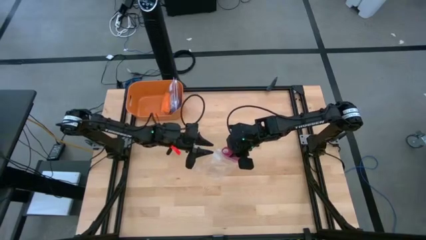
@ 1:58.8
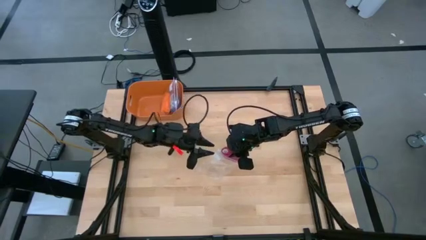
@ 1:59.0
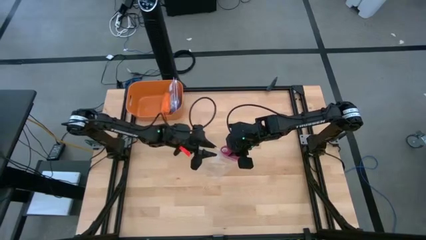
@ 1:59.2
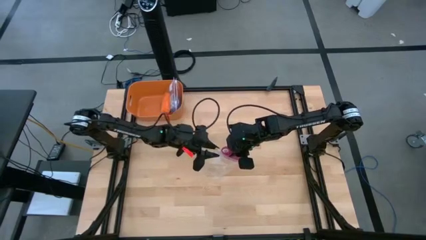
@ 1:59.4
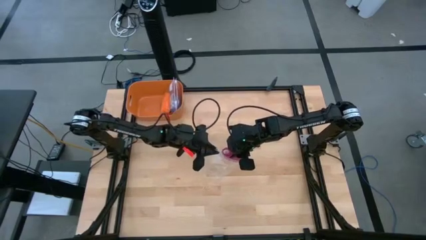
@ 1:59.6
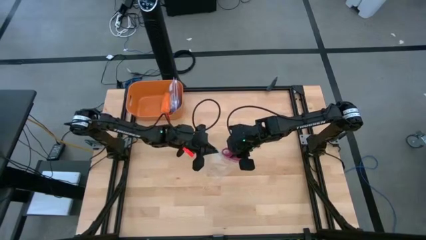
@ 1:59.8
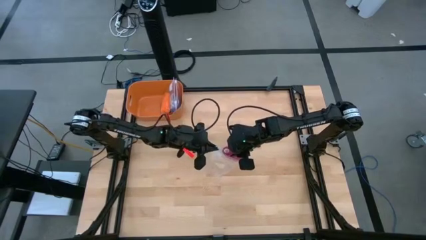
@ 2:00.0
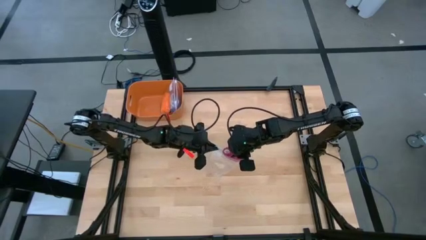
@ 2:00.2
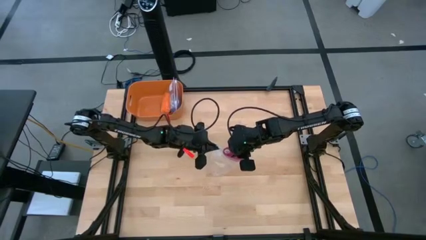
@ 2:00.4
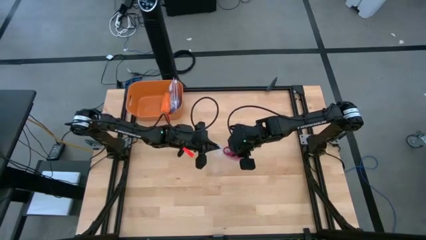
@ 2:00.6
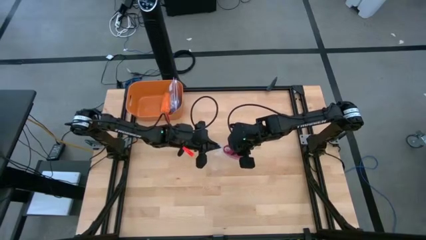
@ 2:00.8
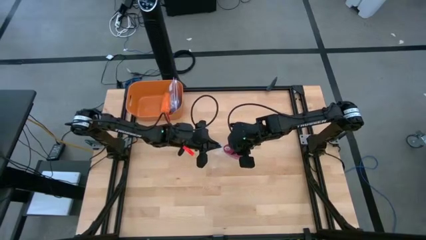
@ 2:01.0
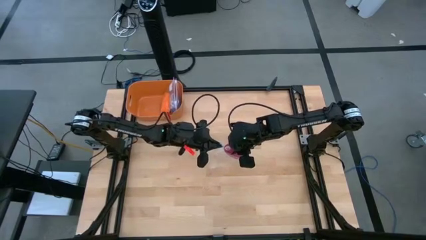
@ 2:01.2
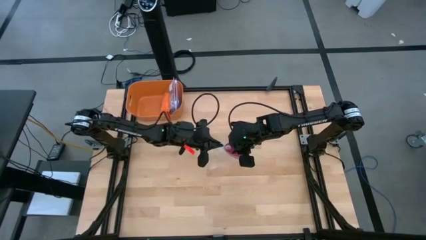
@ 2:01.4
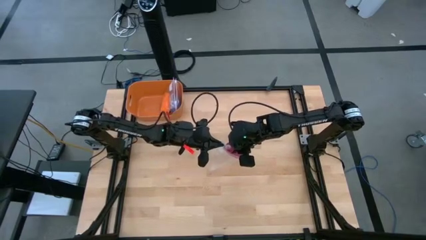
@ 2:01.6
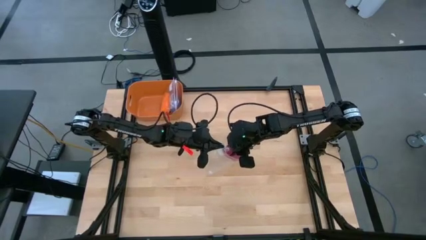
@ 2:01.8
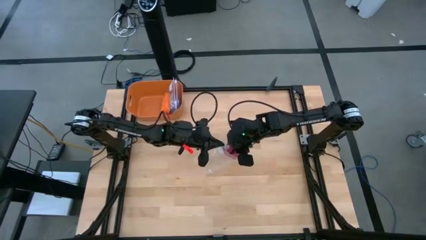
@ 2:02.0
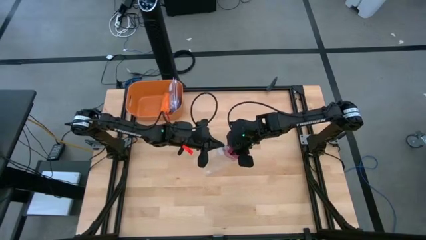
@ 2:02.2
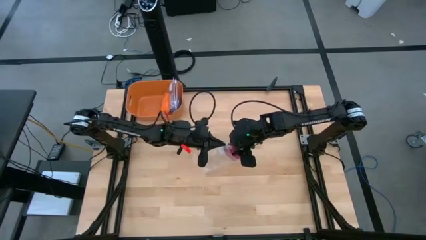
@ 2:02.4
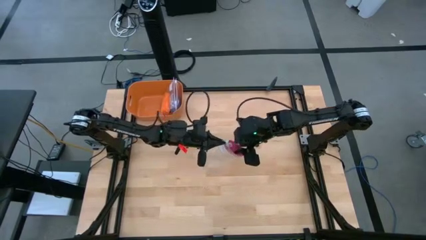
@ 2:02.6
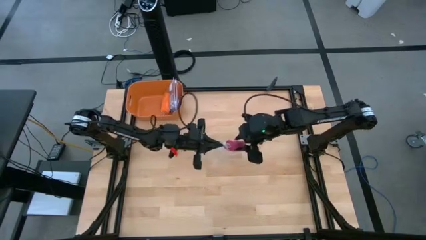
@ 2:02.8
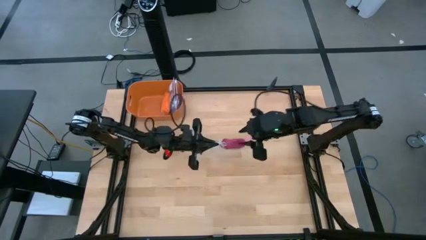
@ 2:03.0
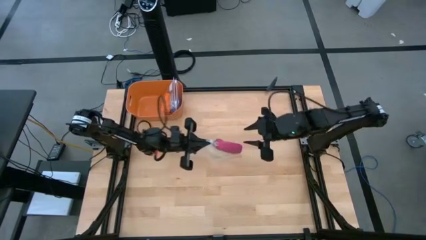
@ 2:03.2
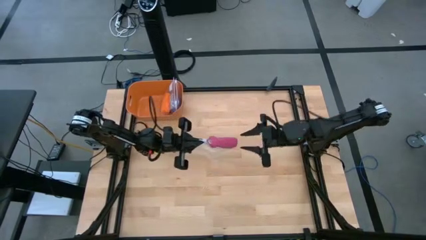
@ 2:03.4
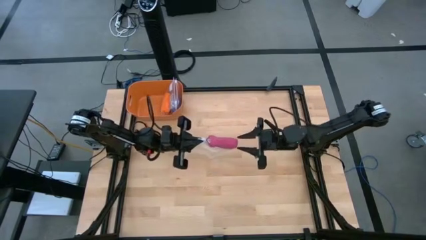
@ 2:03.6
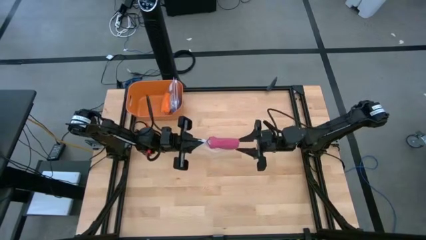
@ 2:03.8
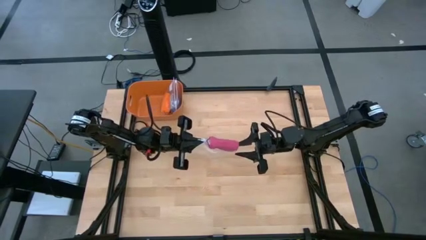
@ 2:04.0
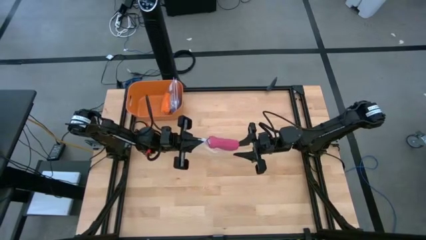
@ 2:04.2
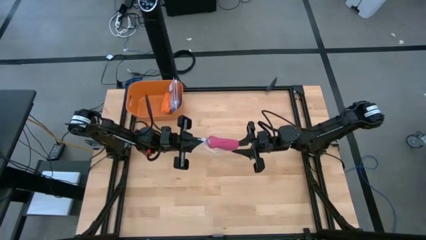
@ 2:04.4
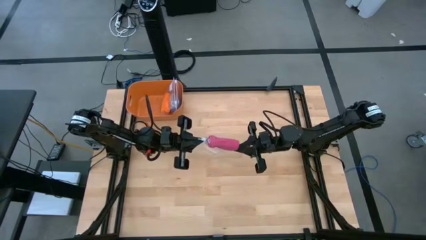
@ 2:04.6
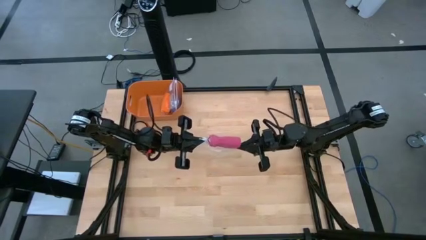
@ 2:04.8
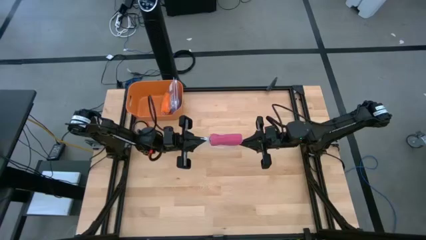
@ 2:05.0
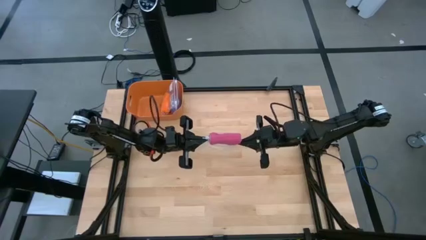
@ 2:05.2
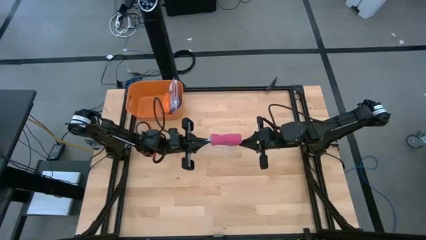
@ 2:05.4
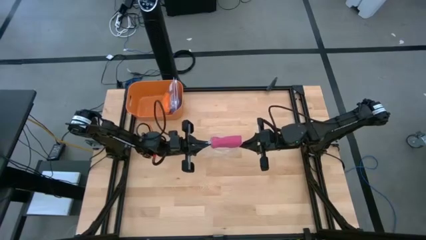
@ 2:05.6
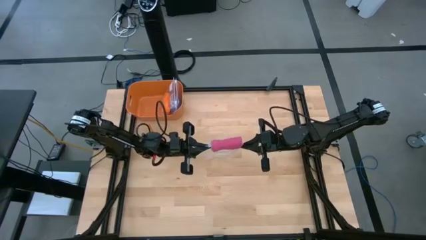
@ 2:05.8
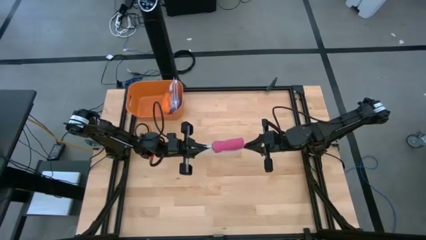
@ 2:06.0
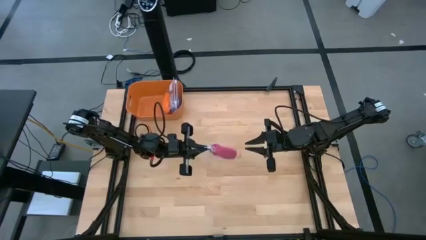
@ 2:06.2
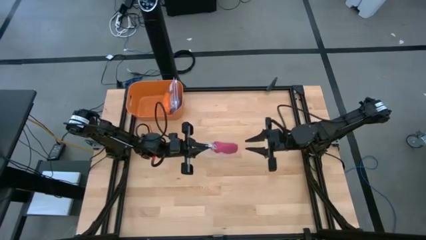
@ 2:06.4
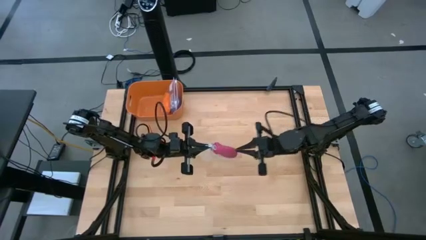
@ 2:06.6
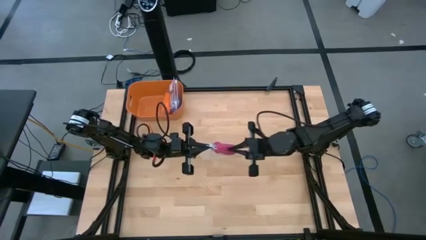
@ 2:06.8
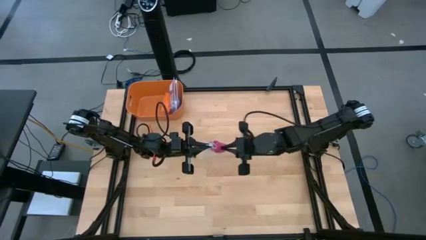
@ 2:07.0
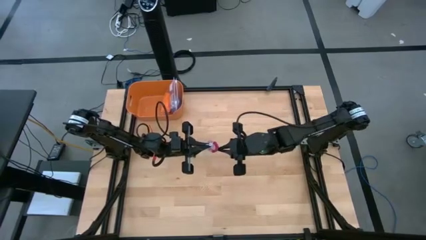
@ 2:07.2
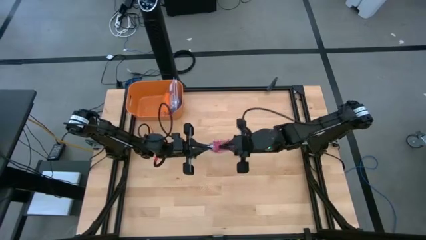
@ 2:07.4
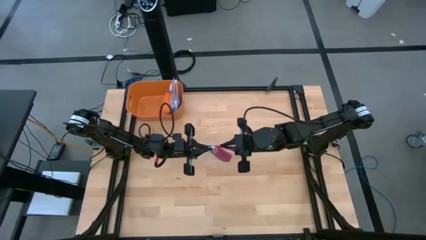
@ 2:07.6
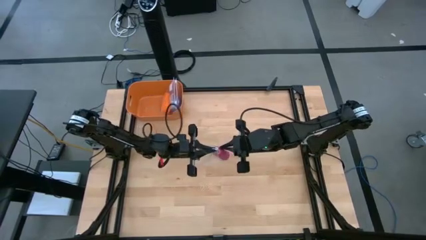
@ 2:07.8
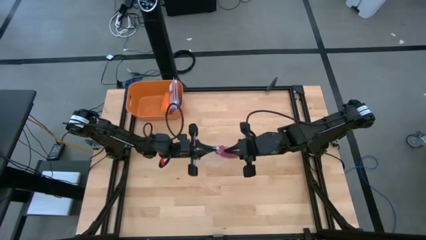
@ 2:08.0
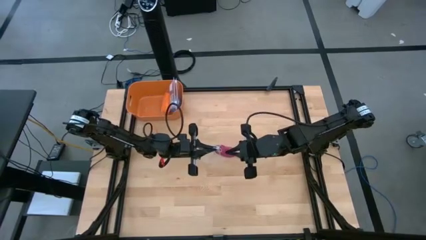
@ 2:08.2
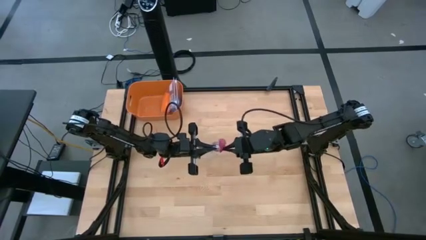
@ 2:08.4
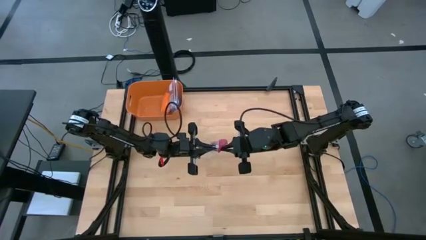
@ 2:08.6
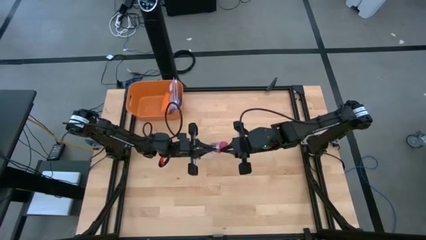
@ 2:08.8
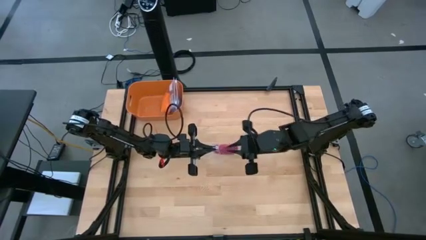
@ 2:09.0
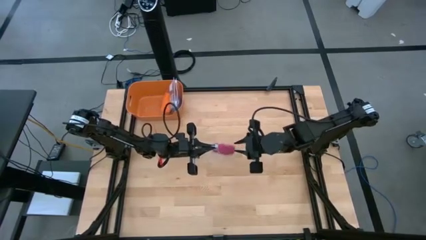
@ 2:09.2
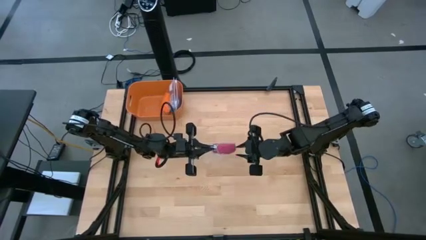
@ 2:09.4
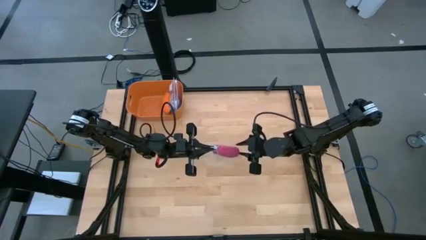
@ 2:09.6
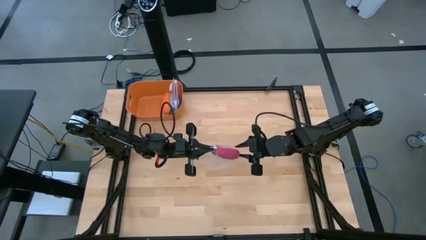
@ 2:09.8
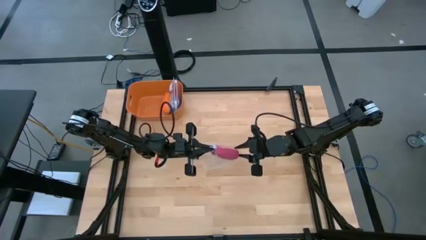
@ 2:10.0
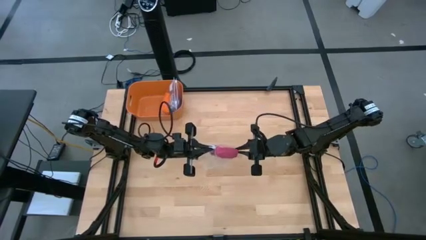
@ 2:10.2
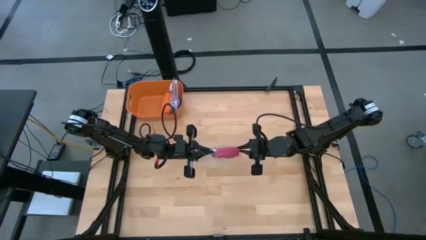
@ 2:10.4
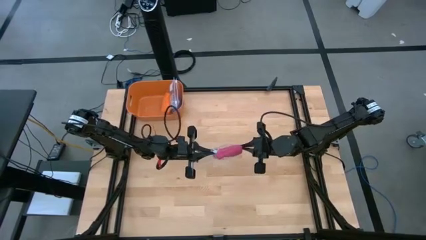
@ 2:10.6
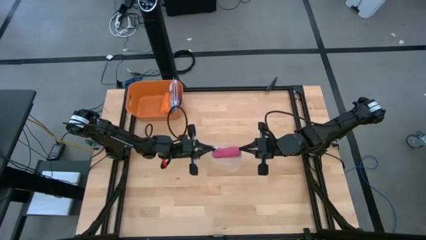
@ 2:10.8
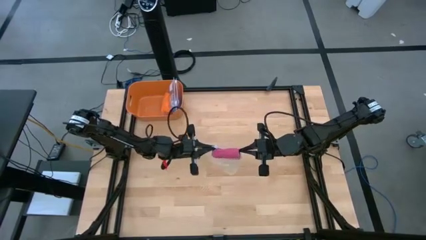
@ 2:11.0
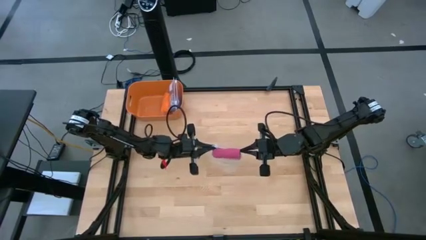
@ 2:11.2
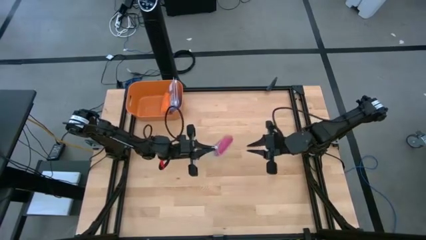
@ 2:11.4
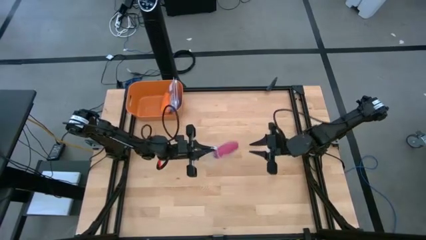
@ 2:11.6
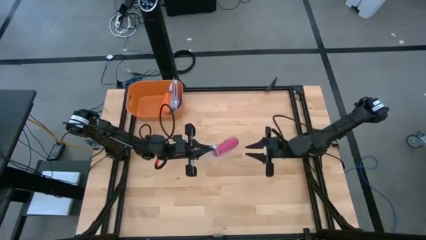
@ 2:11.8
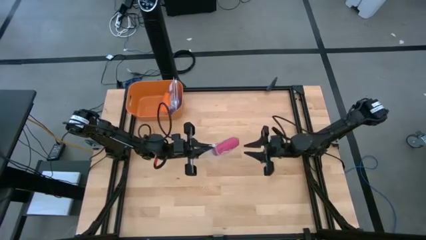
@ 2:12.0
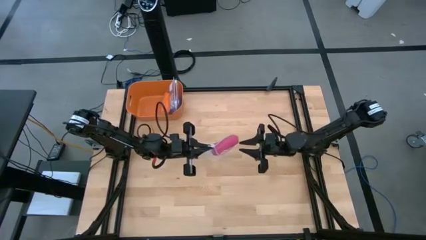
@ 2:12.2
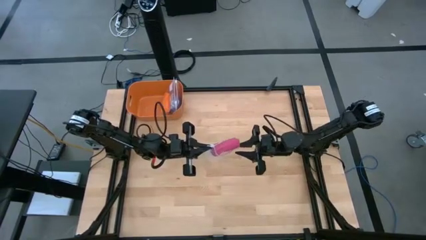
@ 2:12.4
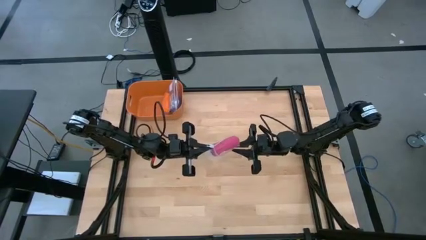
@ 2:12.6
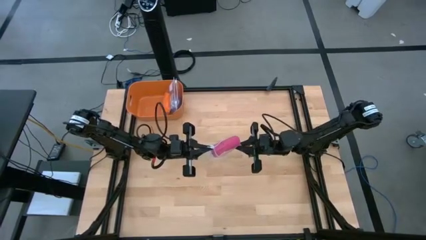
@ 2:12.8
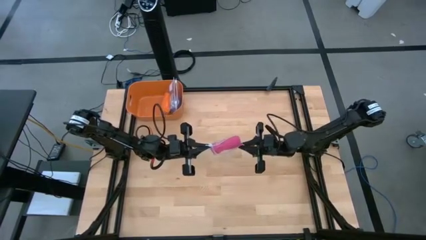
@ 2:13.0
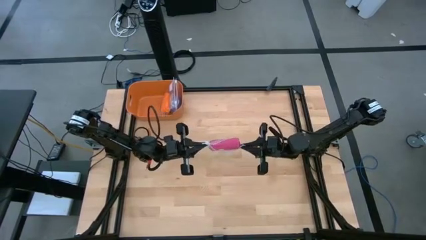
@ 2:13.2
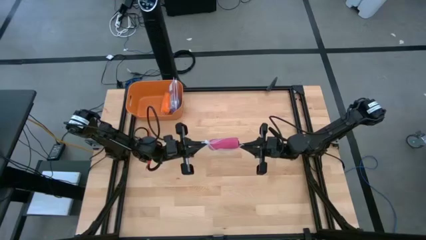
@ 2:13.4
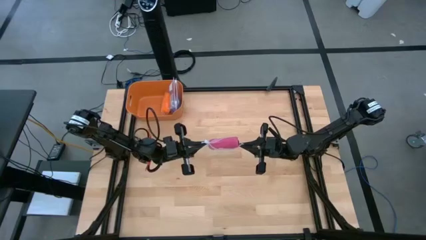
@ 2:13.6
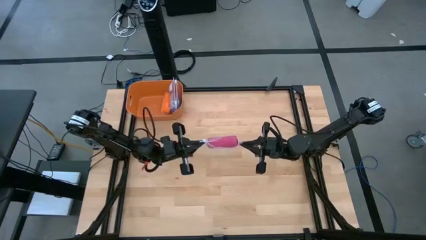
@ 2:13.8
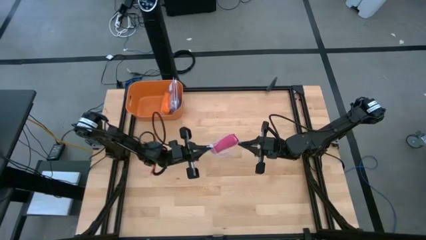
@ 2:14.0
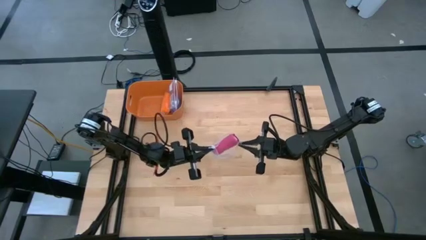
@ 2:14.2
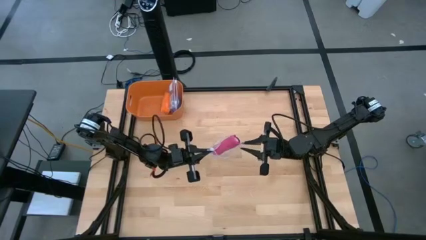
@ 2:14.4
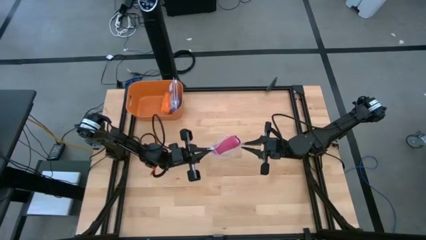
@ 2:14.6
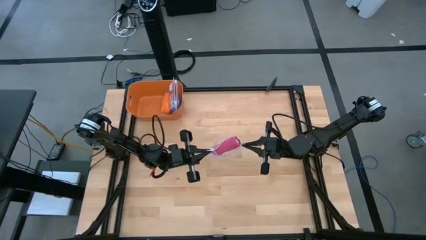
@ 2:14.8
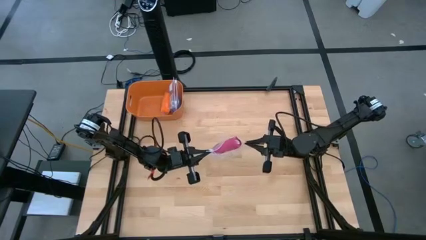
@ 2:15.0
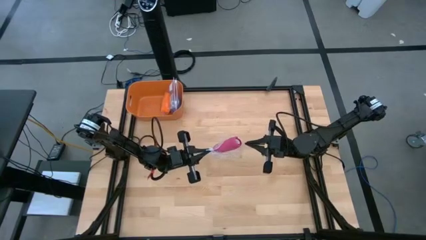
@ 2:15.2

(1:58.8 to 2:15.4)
Task: Roll bandage
Put the pink bandage into the transparent zip bag
